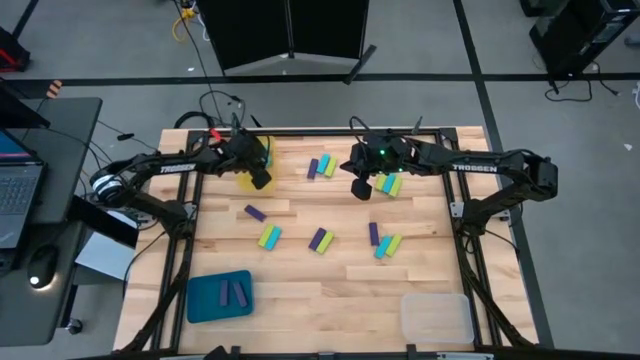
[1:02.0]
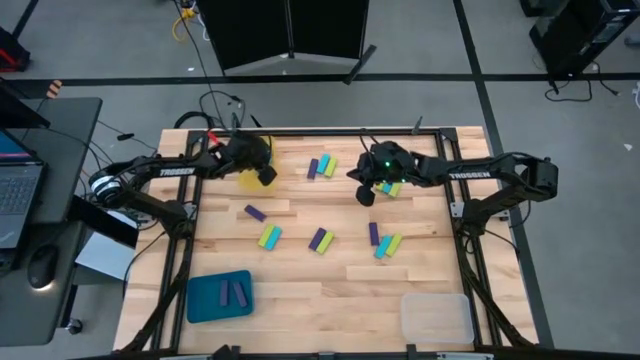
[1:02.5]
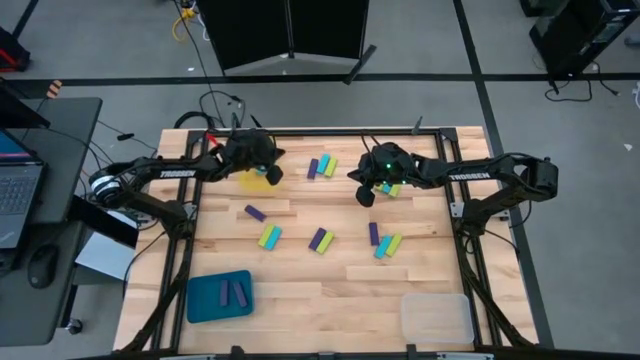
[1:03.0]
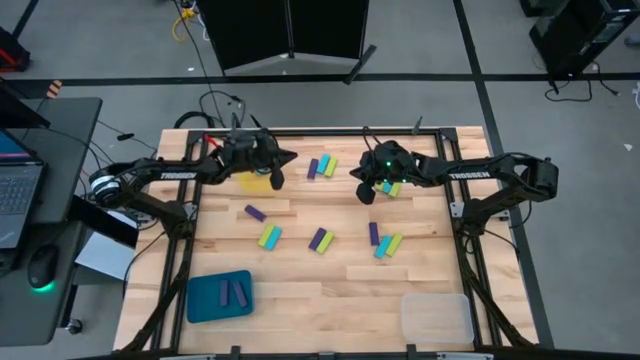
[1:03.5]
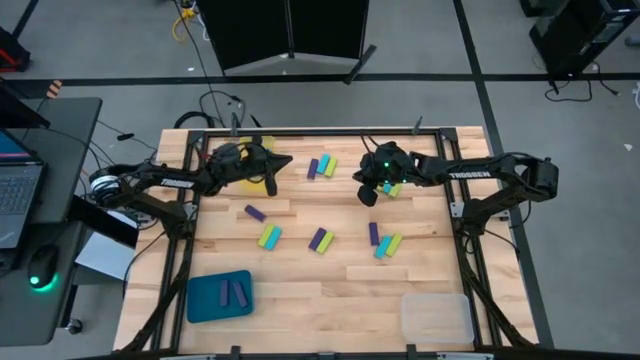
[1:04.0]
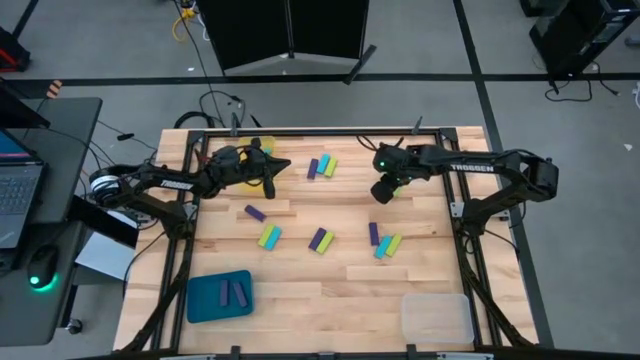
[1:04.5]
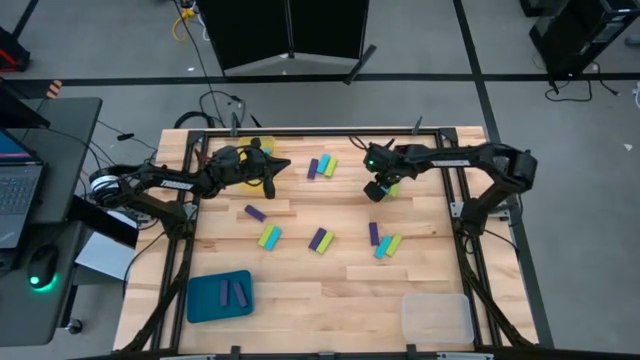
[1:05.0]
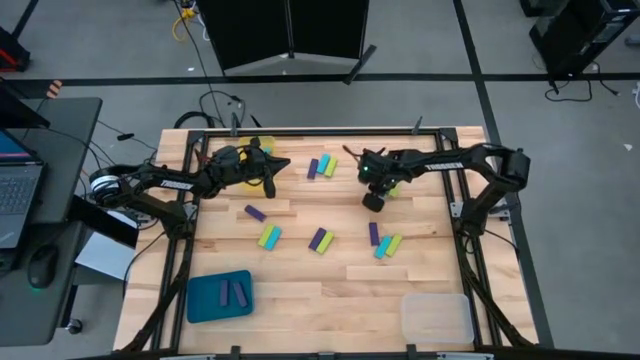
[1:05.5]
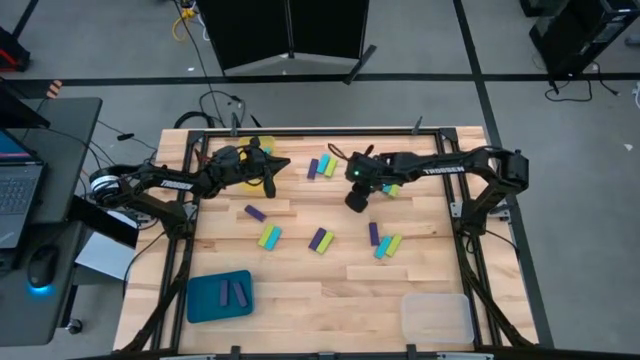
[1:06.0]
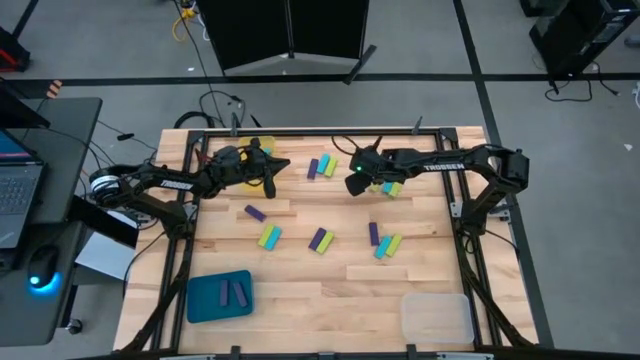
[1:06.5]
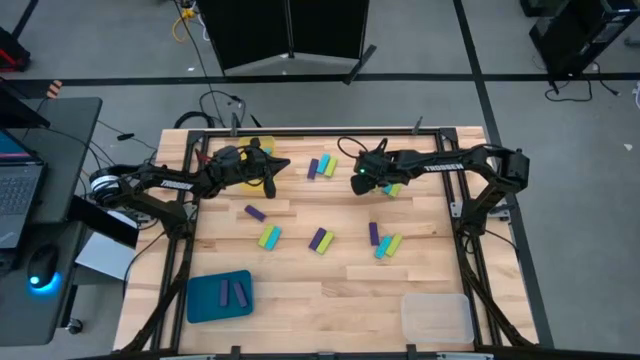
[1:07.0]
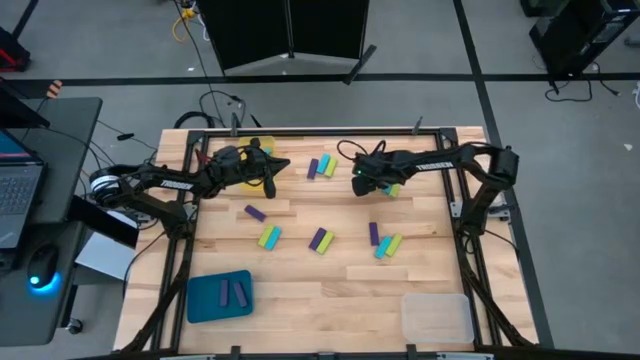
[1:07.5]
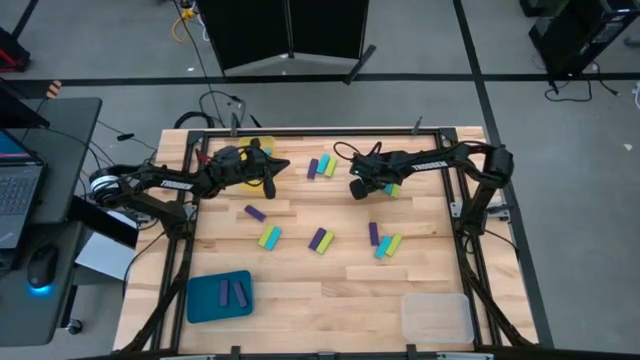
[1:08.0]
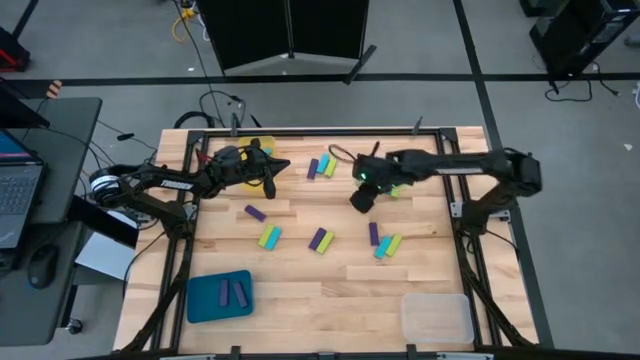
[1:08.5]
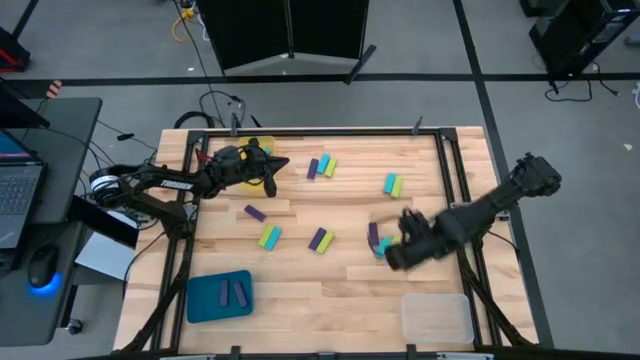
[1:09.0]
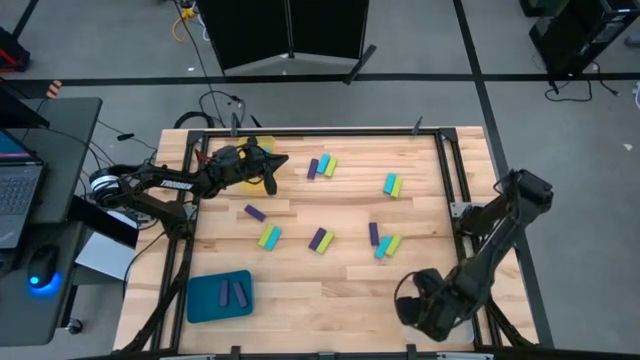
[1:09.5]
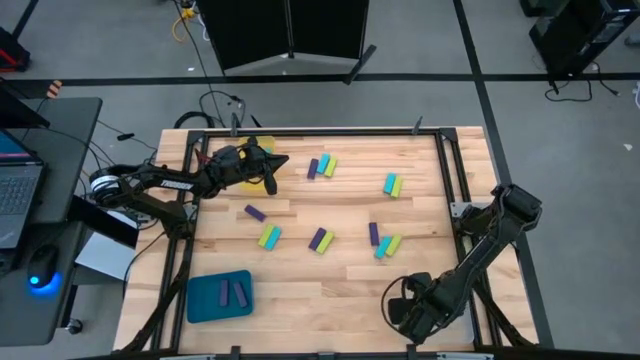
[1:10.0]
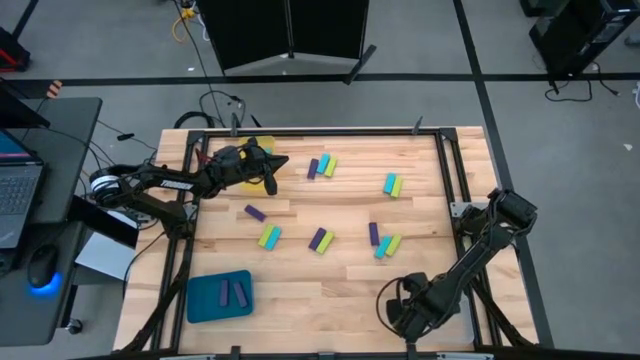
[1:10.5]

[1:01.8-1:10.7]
Task: Sort blocks
Put the green block into the transparent bin

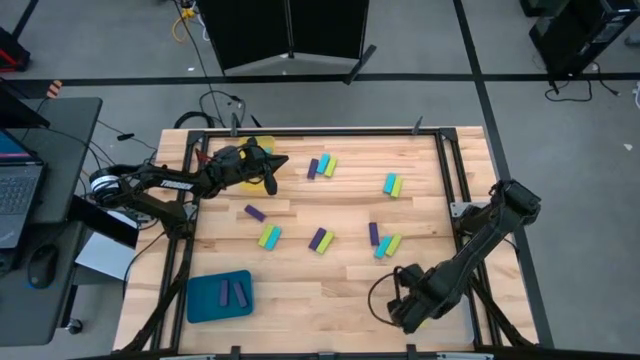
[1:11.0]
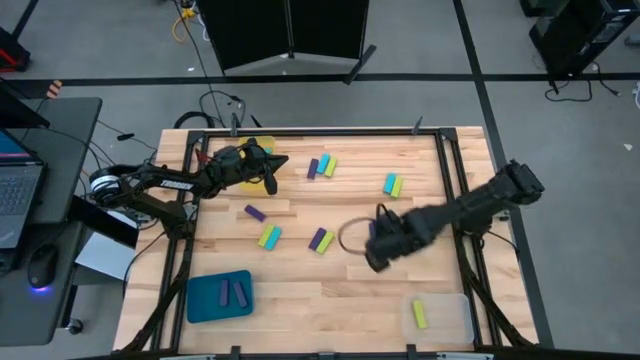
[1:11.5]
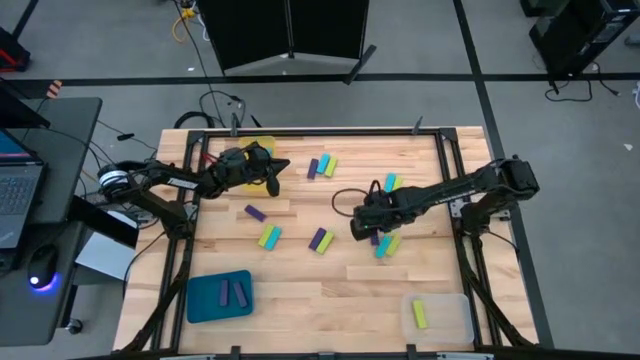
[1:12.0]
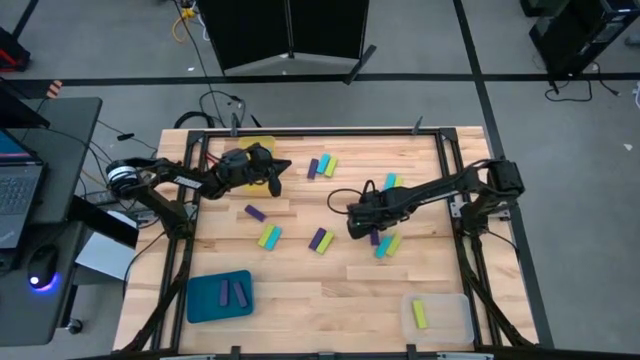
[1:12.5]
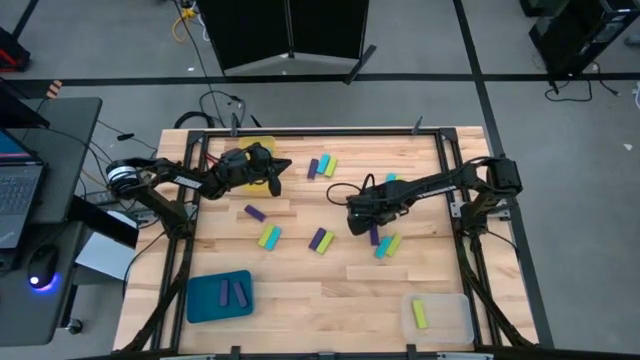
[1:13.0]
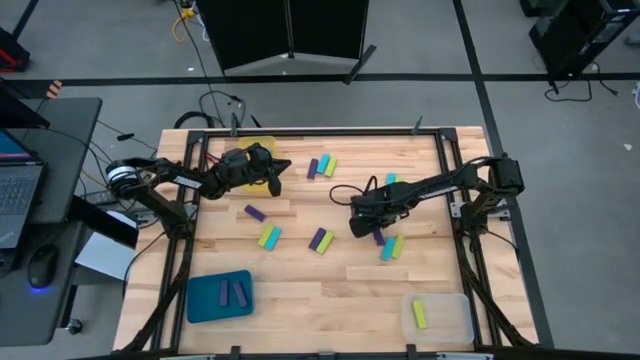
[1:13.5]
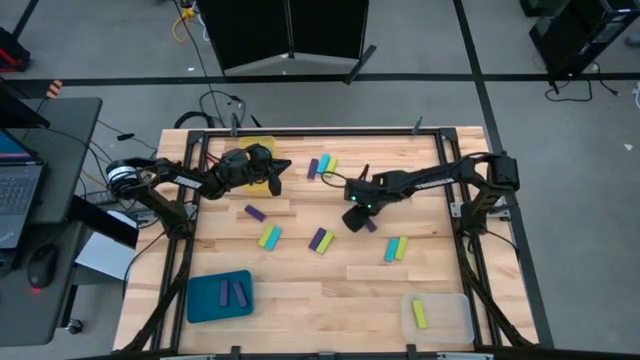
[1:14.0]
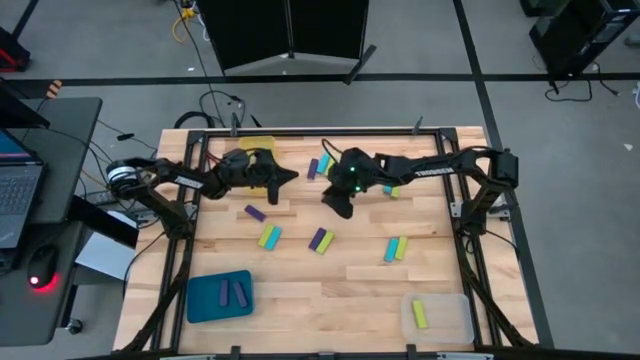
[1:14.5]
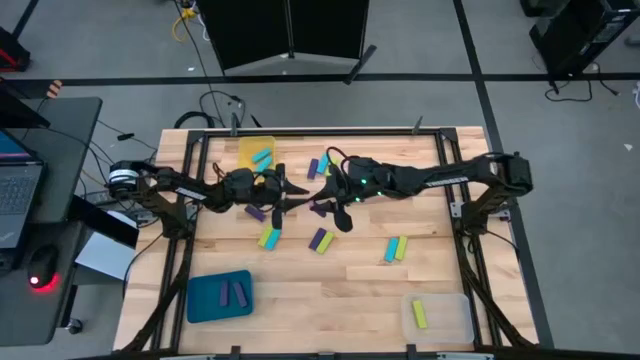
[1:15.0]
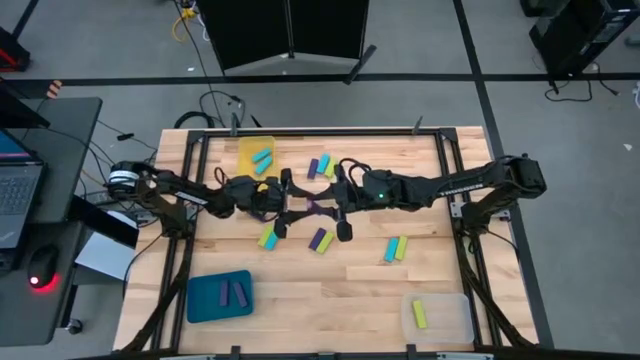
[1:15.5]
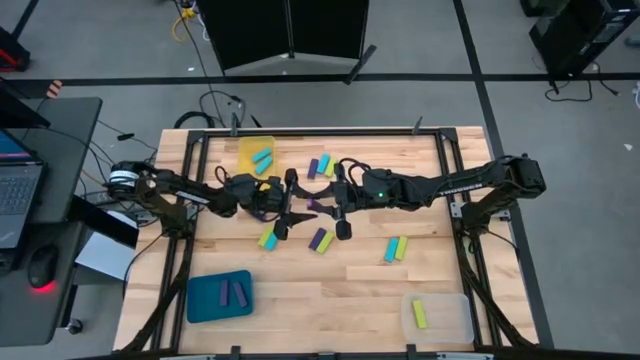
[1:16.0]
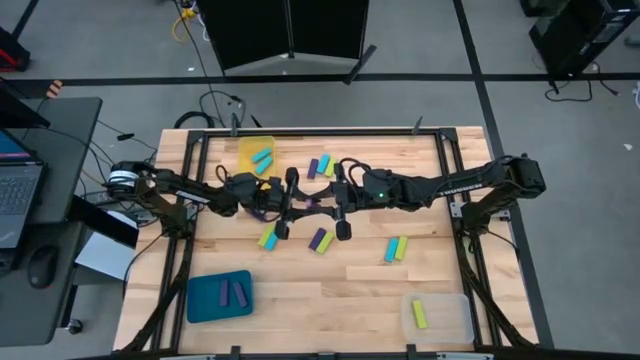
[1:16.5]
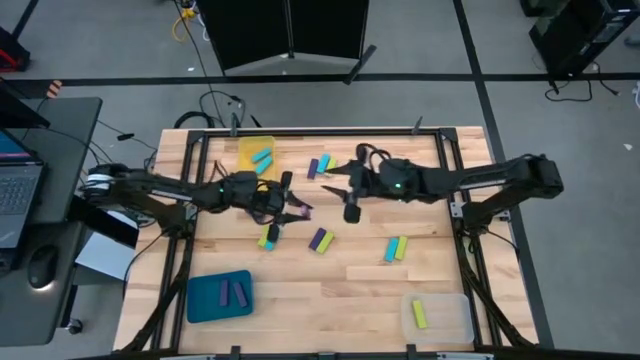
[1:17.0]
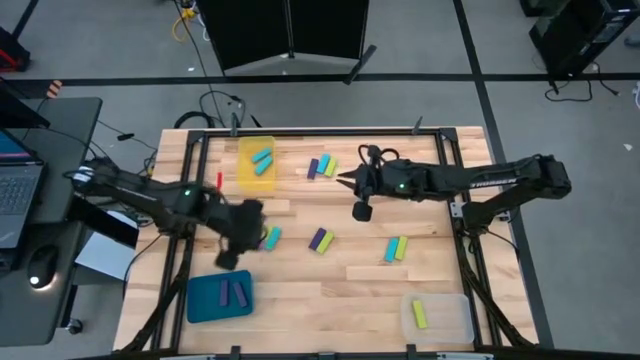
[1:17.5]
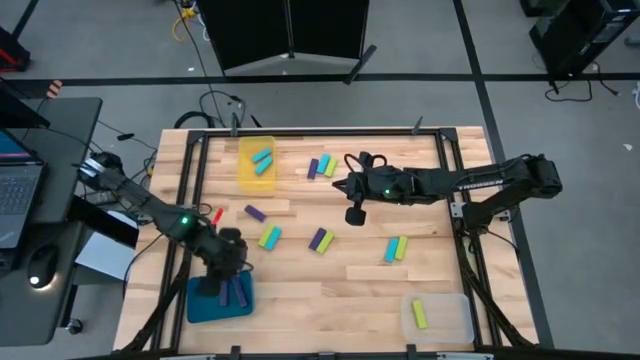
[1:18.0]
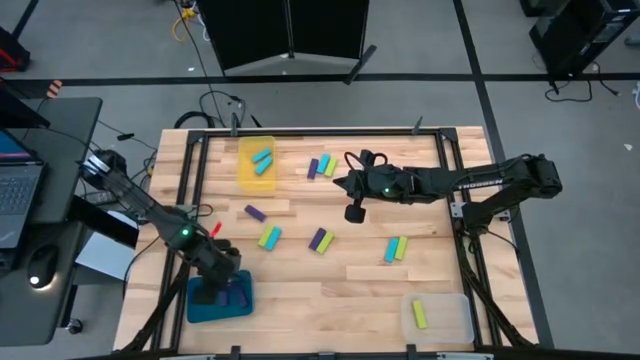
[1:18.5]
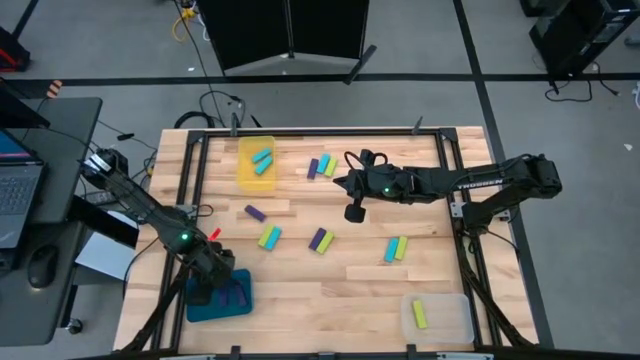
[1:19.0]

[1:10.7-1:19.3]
Put the purple block into the blue bin
